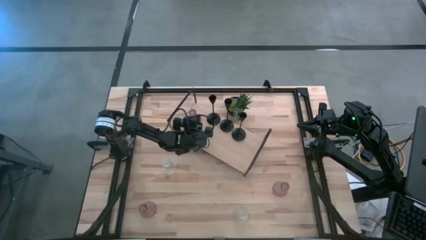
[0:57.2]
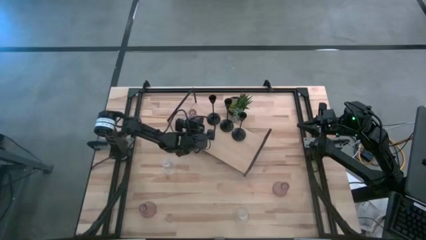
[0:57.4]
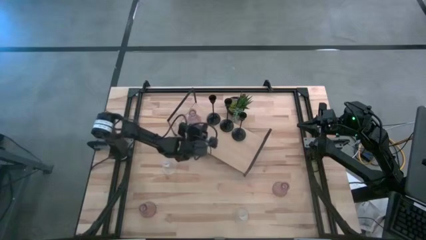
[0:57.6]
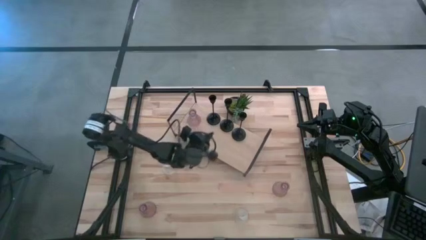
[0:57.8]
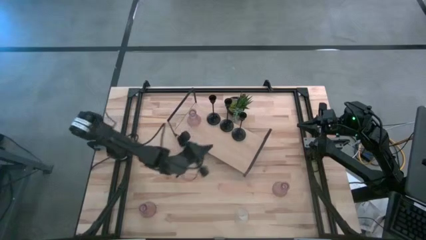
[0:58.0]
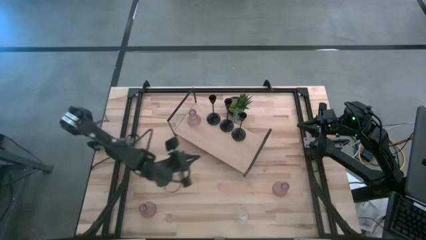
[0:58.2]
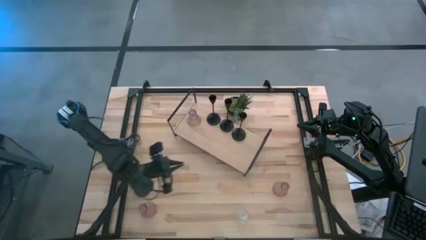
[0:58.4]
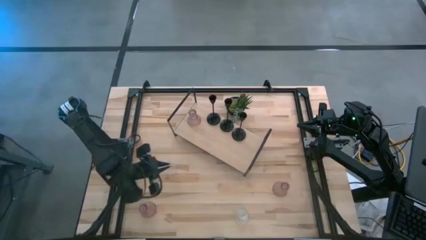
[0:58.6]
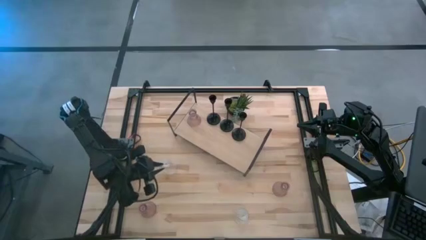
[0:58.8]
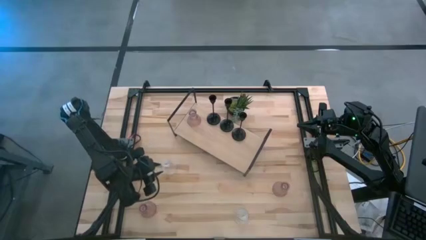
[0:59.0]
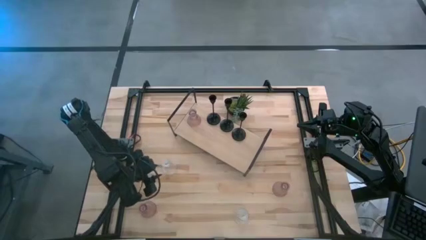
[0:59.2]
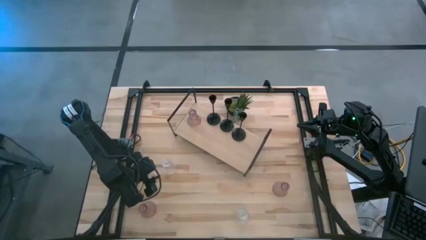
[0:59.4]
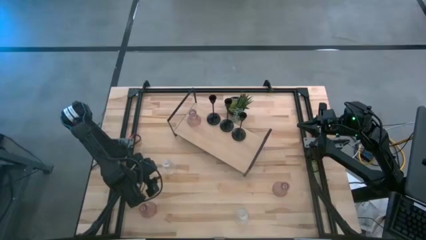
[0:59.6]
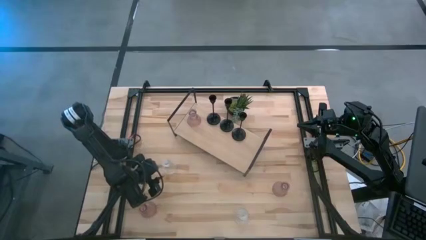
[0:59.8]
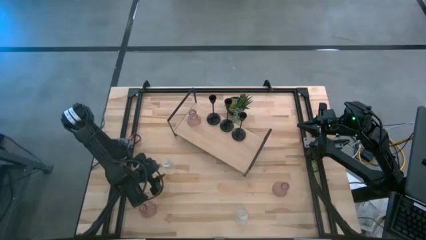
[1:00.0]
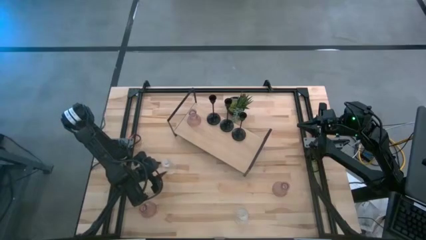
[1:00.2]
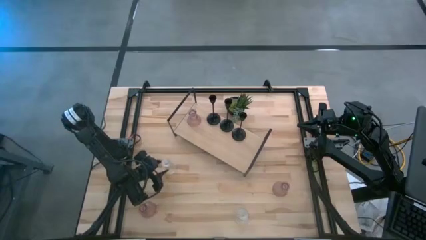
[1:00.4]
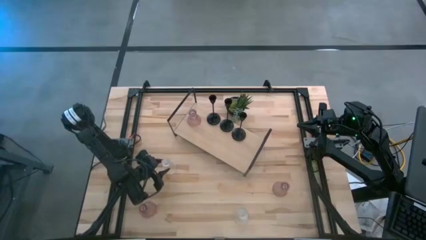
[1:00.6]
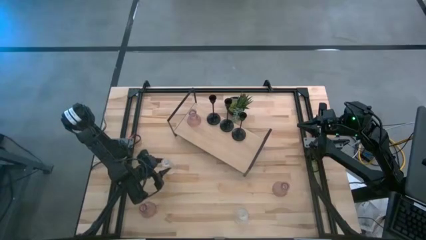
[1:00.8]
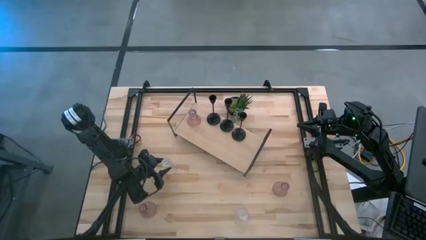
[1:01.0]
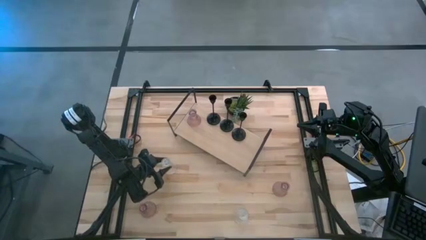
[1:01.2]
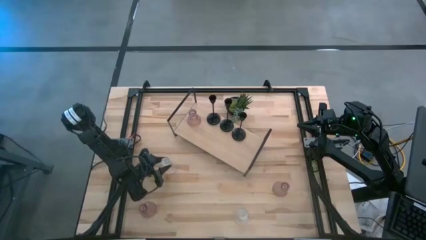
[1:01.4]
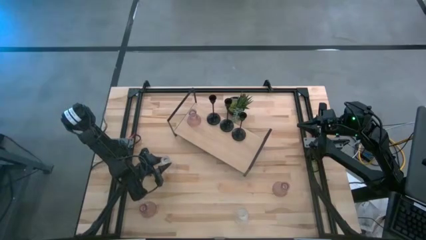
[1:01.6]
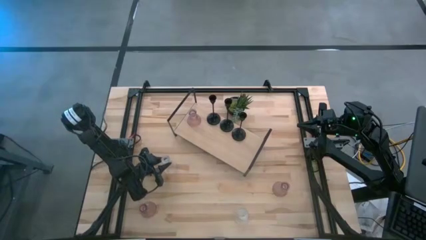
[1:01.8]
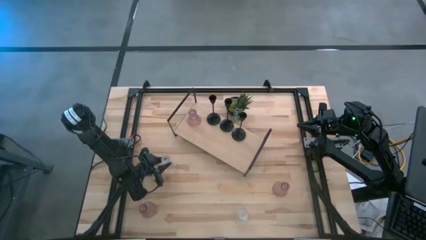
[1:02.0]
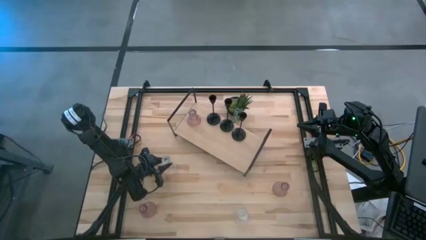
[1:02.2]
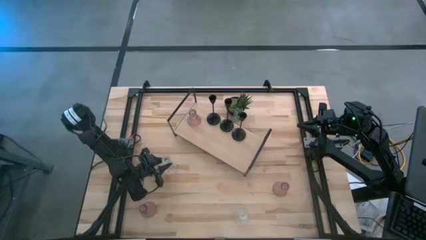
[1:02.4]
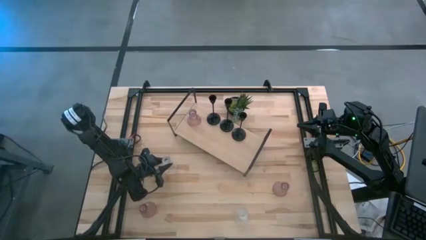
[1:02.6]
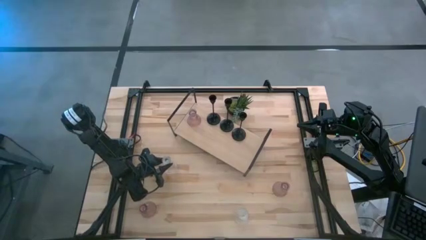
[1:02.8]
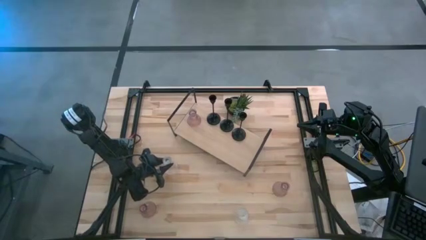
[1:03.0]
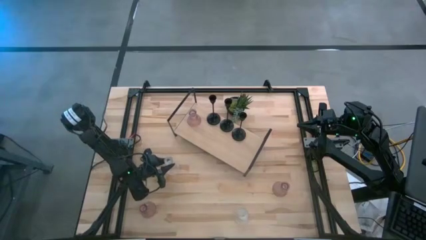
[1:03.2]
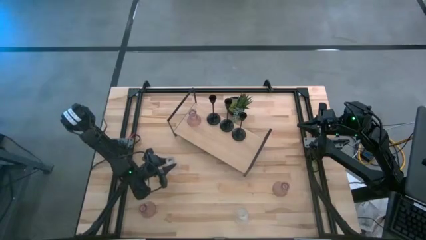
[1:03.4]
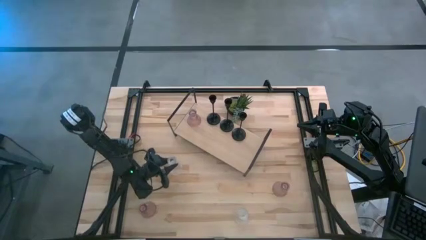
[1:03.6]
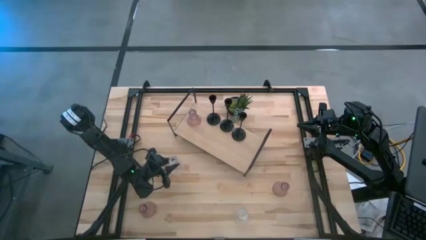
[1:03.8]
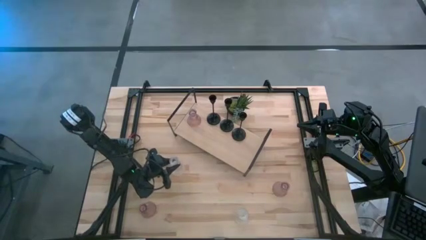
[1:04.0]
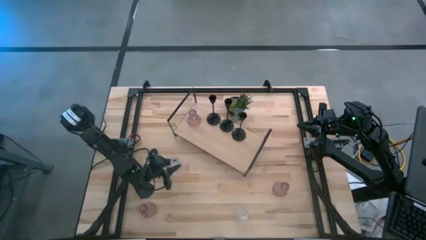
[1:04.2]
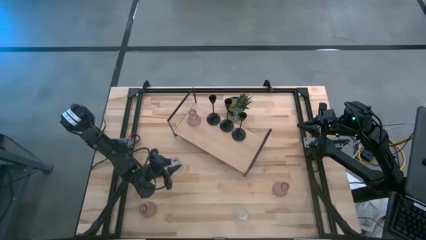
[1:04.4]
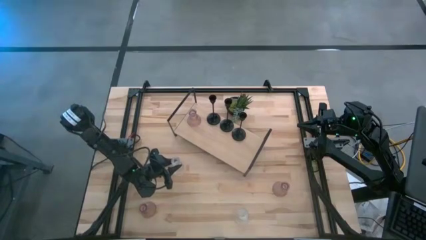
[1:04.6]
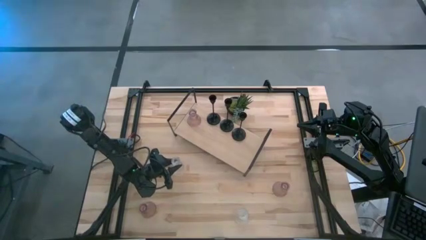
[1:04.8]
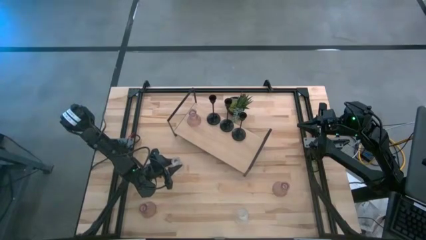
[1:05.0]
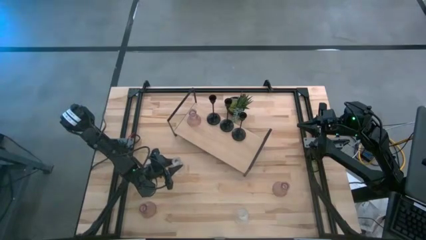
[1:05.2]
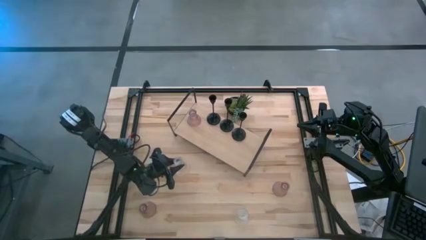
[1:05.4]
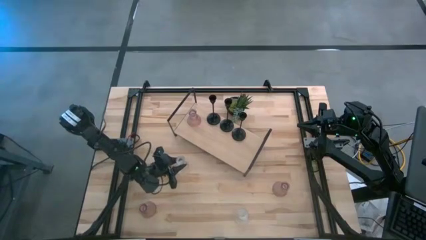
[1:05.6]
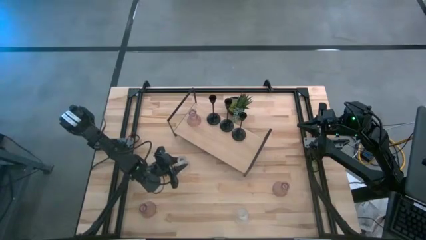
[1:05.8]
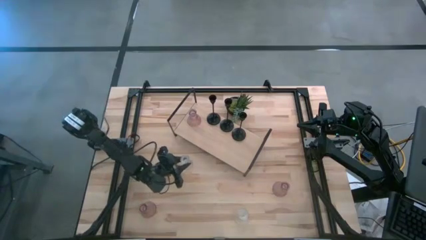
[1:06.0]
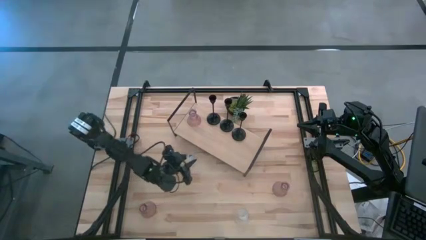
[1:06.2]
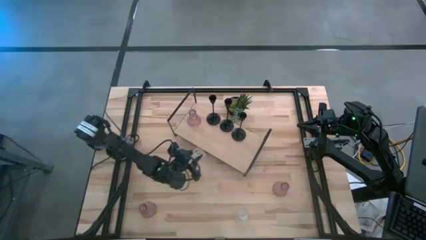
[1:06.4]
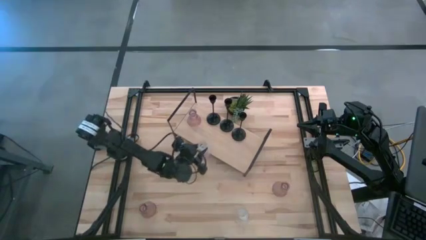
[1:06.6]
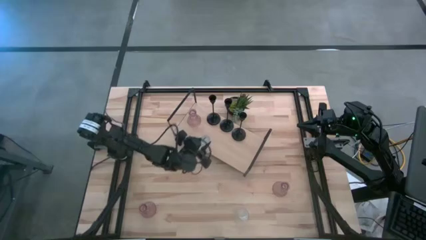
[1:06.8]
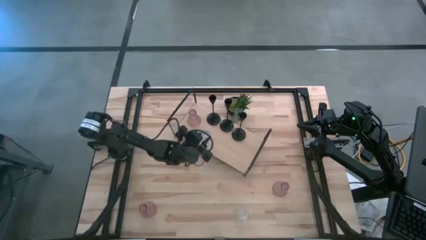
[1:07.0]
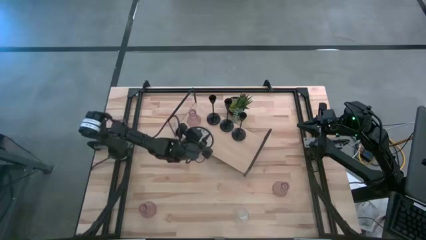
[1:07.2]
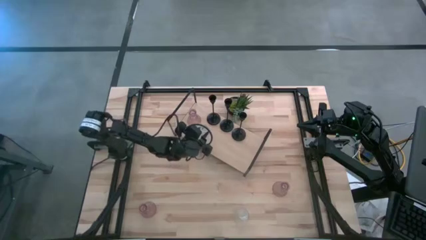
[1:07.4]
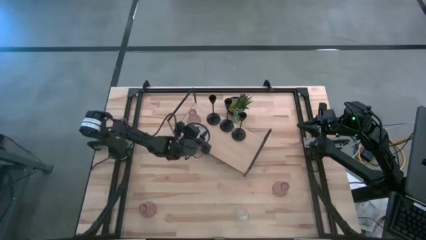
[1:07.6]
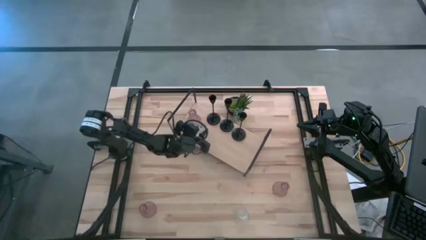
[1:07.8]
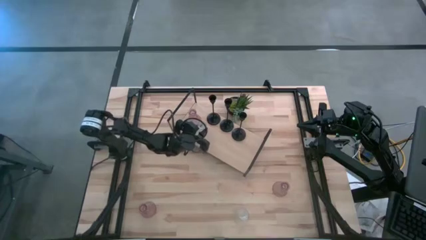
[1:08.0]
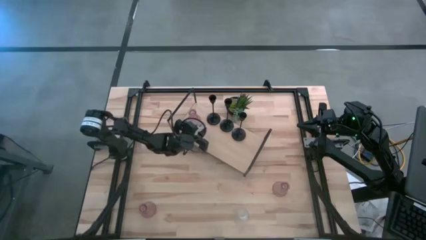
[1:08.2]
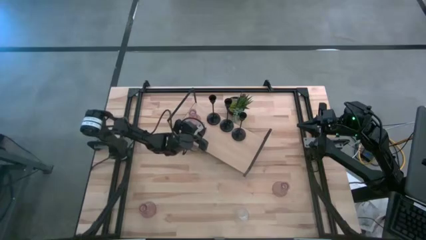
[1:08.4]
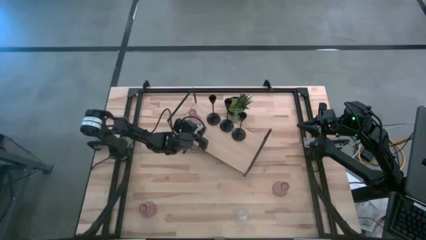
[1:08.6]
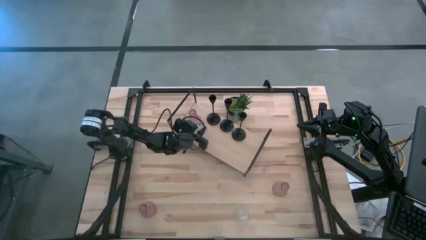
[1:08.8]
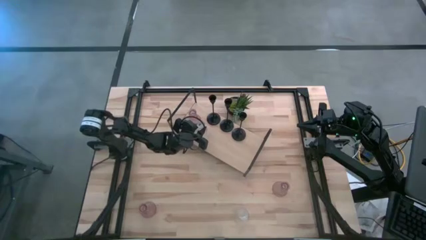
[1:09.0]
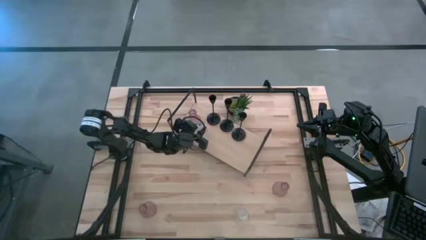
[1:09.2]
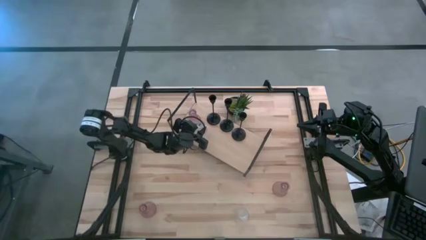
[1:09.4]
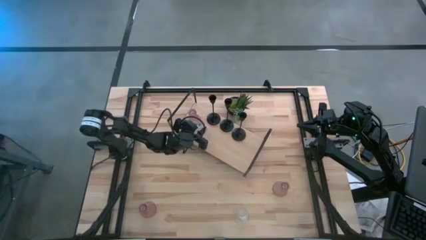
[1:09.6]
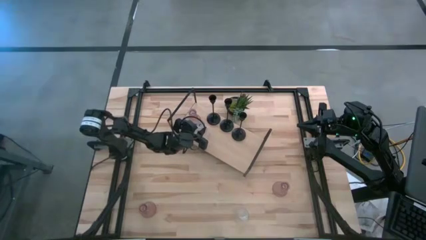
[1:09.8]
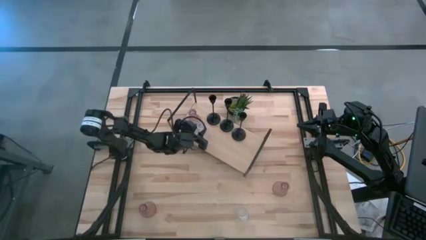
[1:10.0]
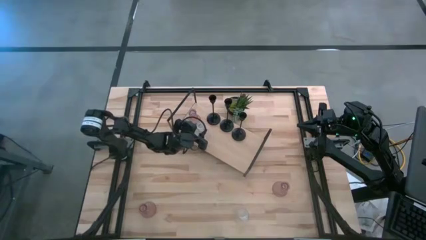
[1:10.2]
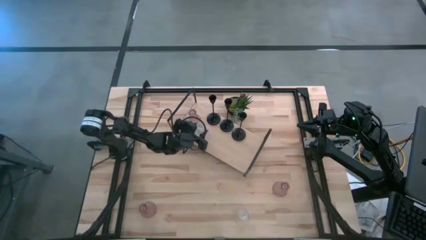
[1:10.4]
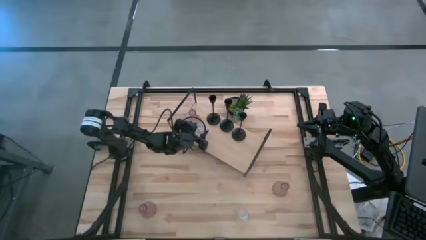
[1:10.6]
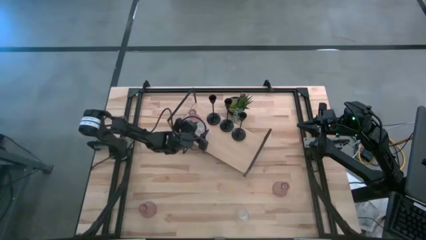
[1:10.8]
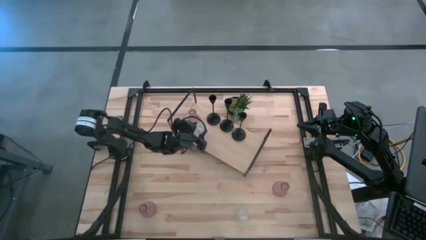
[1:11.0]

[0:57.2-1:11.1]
Task: Pick & Place candle stick holders
Put the top transparent glass candle holder on the shelf

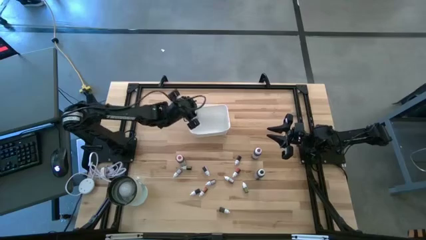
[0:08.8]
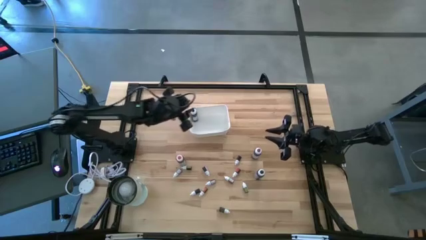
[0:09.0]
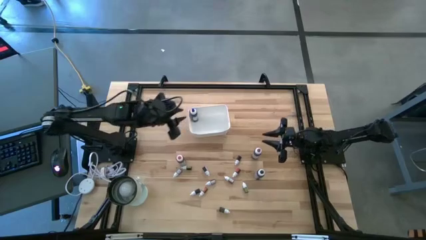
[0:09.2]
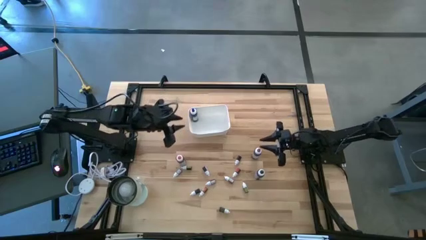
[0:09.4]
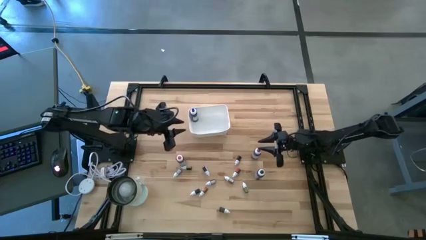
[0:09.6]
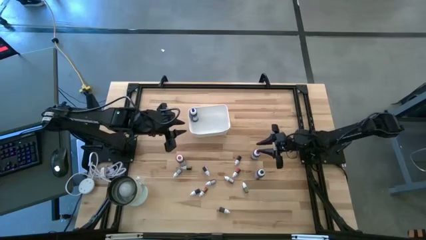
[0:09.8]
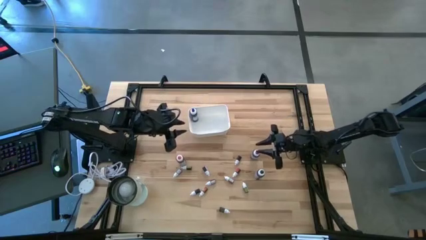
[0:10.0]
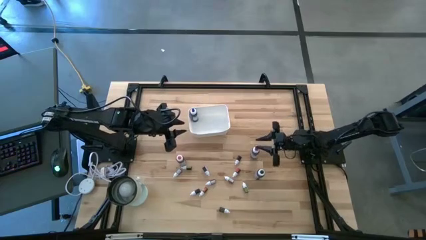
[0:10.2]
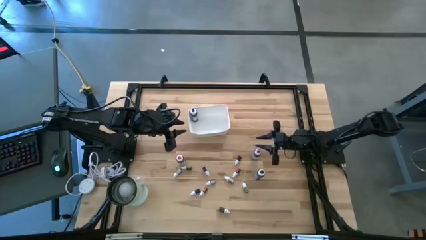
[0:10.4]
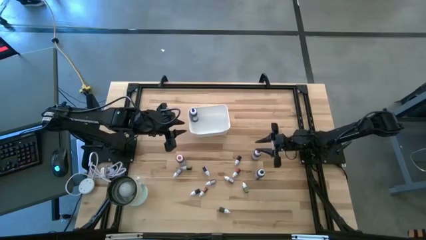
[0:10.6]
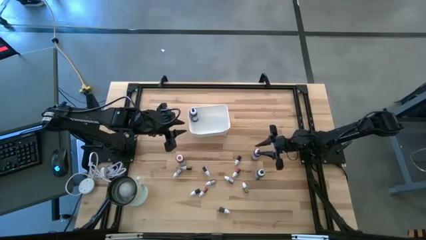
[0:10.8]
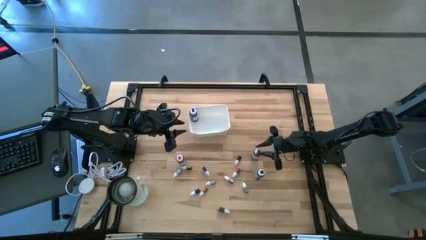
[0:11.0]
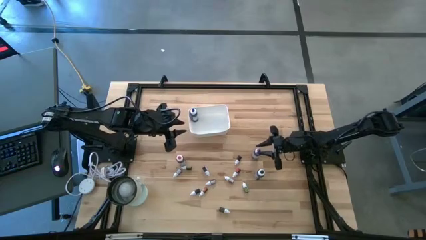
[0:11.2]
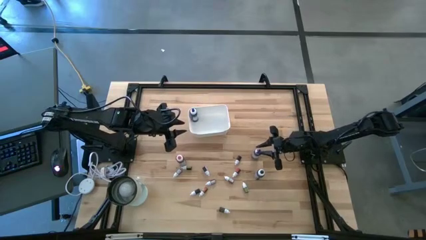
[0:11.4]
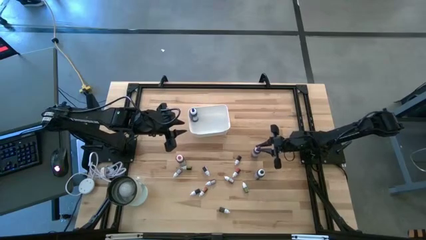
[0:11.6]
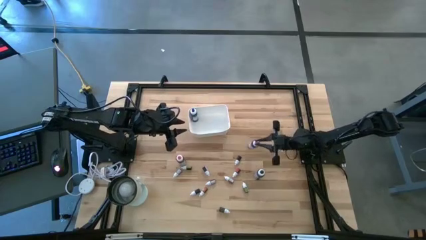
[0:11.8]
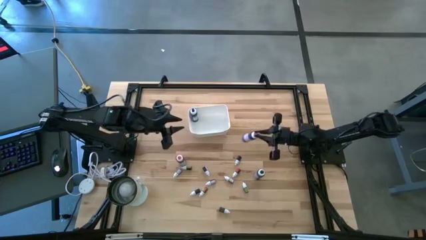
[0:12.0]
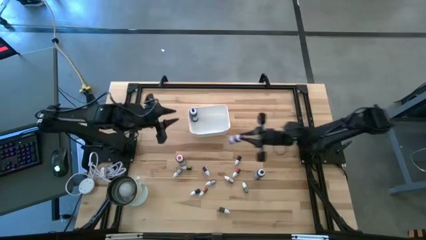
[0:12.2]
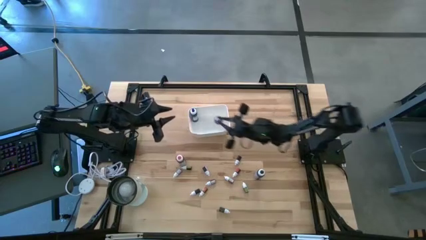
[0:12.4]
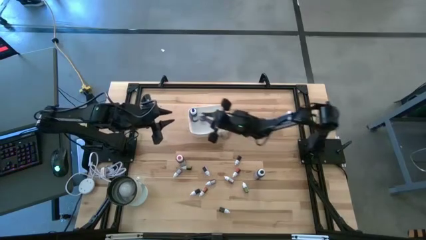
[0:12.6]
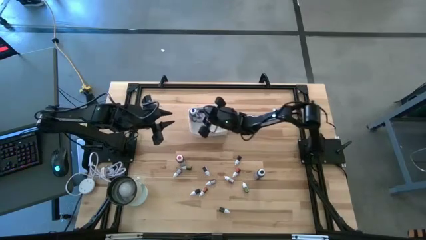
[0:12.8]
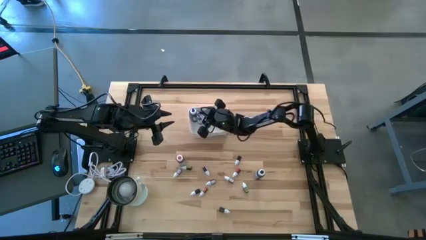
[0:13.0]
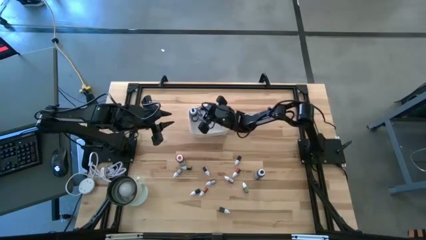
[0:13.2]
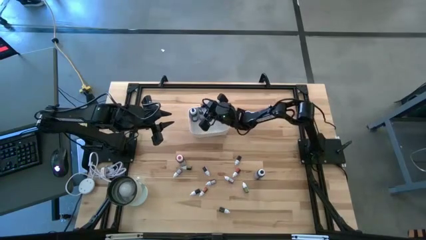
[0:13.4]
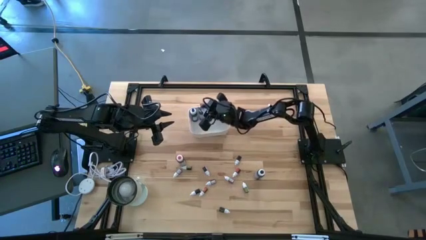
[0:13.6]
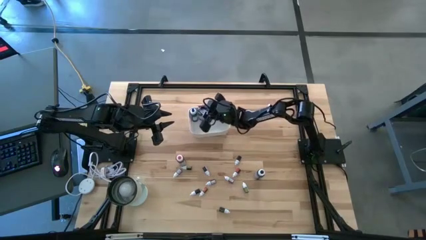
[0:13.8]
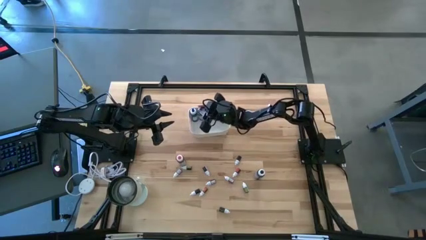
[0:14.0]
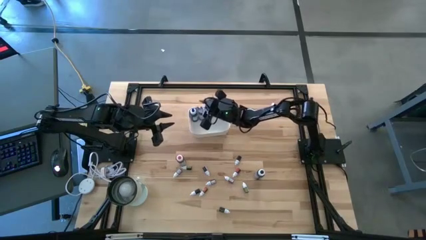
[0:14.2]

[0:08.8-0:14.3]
Task: Pick & Place food coloring
Put the large purple food coloring bottle into the white bin
